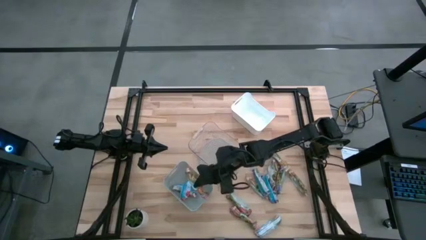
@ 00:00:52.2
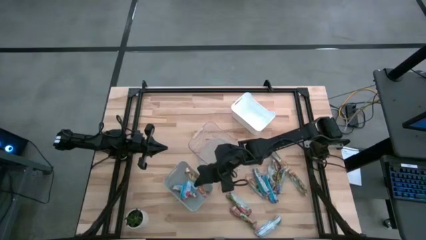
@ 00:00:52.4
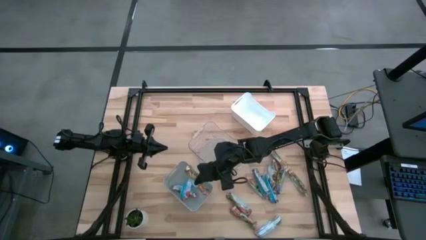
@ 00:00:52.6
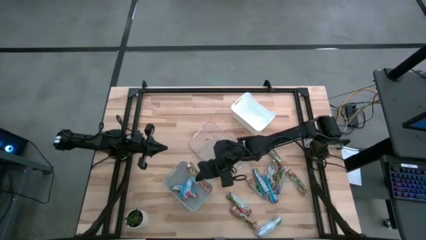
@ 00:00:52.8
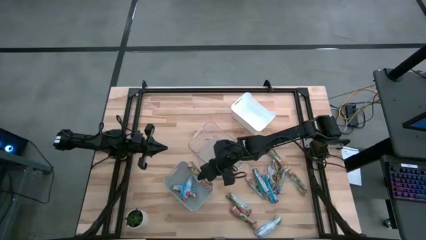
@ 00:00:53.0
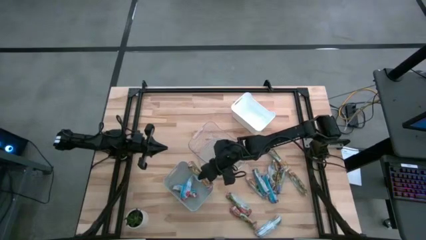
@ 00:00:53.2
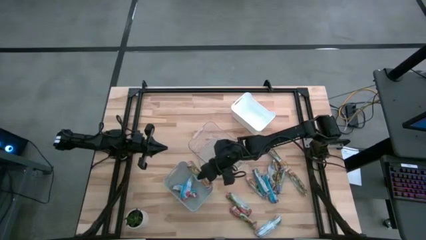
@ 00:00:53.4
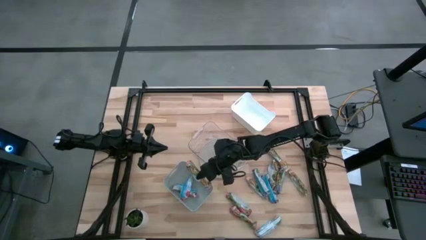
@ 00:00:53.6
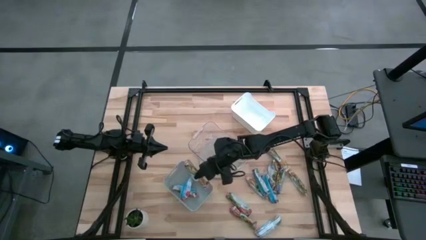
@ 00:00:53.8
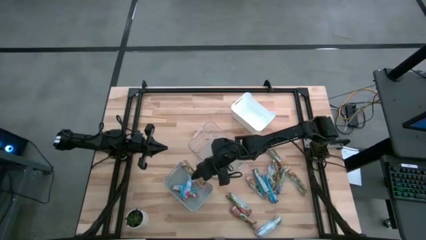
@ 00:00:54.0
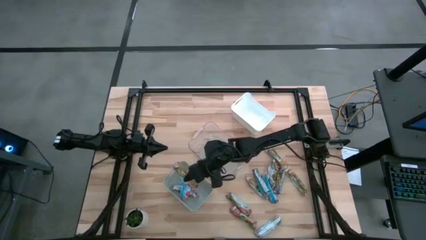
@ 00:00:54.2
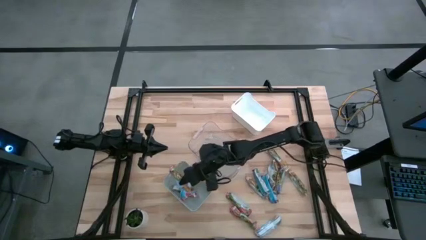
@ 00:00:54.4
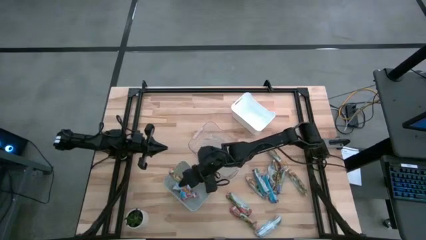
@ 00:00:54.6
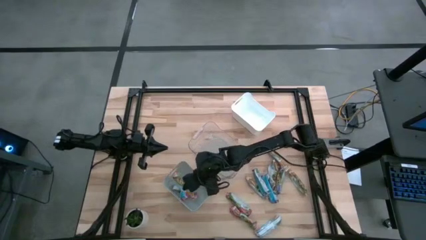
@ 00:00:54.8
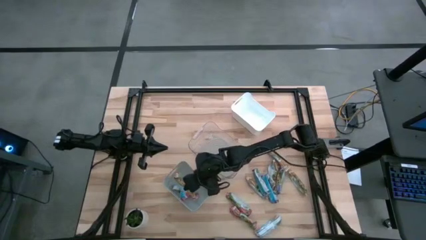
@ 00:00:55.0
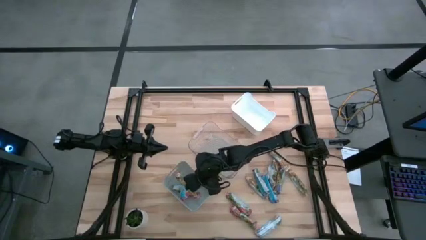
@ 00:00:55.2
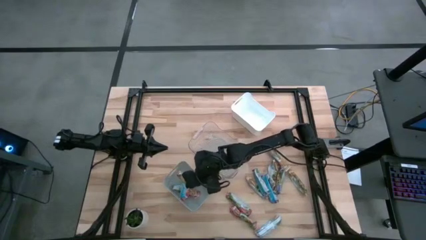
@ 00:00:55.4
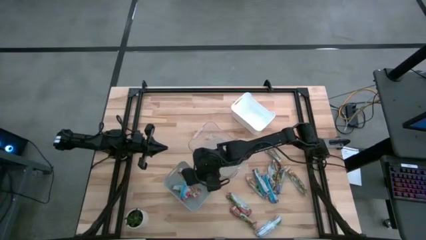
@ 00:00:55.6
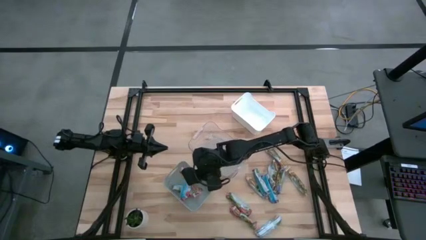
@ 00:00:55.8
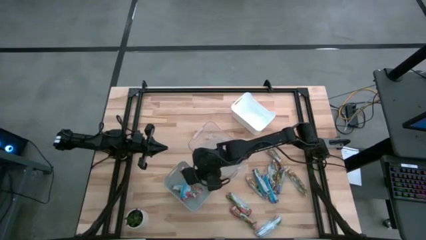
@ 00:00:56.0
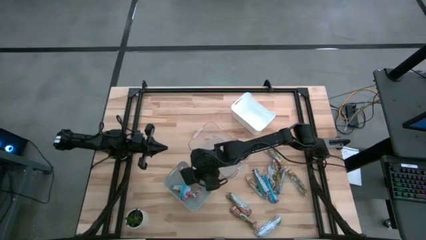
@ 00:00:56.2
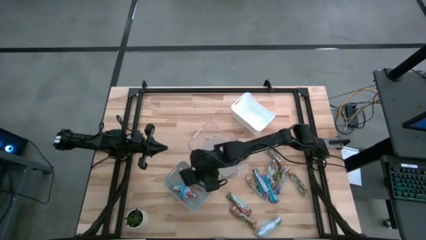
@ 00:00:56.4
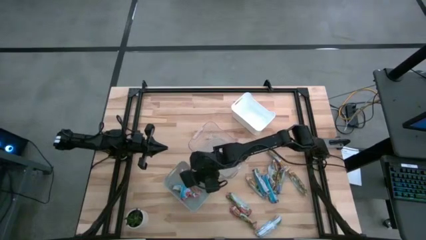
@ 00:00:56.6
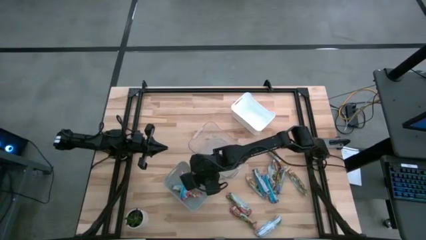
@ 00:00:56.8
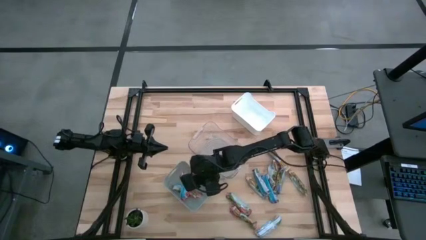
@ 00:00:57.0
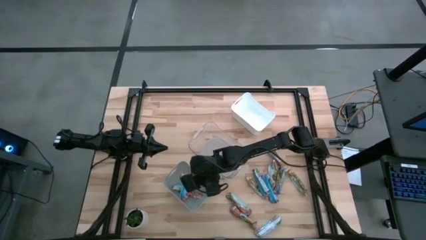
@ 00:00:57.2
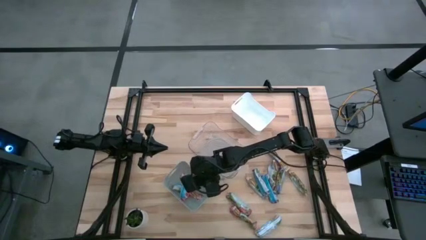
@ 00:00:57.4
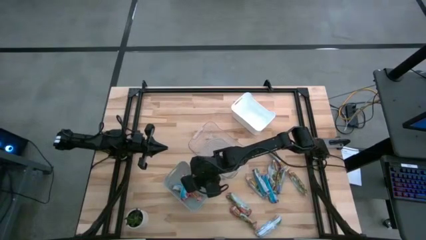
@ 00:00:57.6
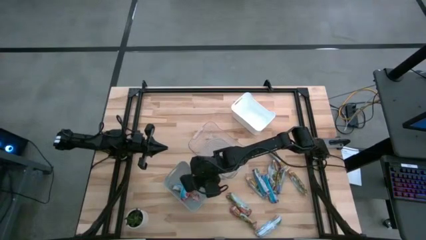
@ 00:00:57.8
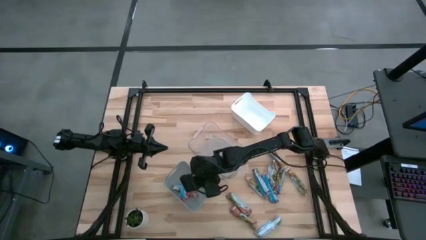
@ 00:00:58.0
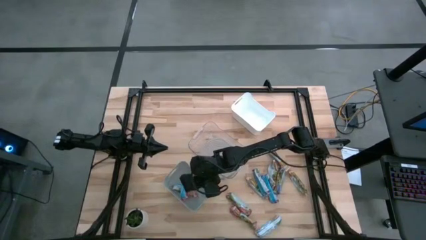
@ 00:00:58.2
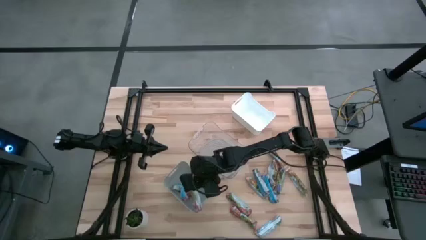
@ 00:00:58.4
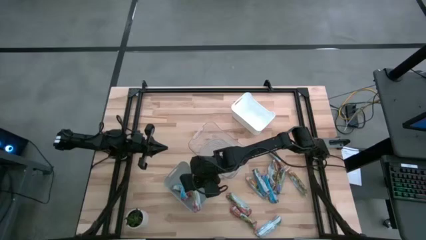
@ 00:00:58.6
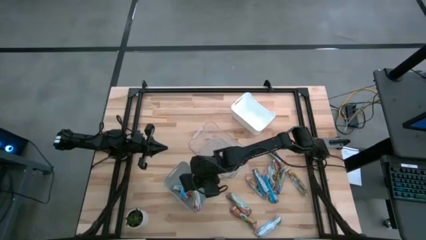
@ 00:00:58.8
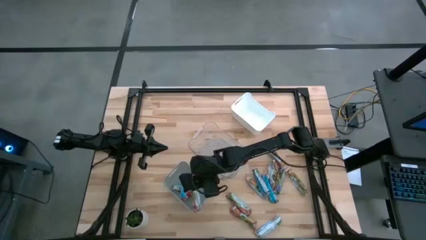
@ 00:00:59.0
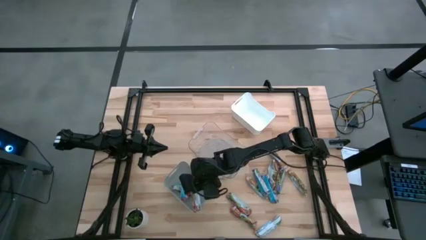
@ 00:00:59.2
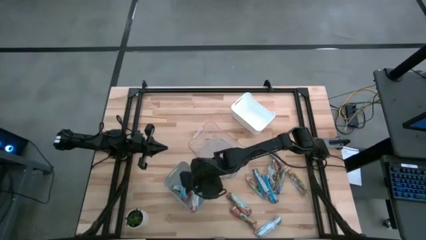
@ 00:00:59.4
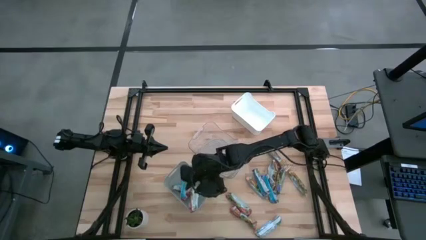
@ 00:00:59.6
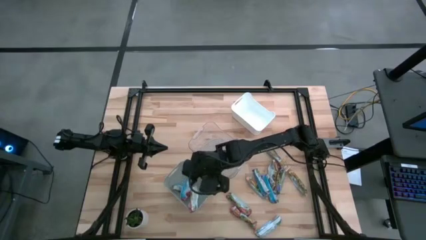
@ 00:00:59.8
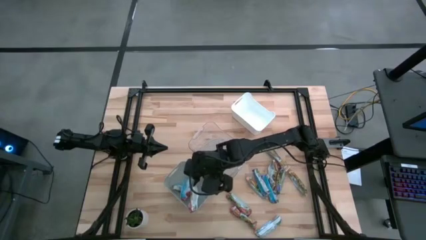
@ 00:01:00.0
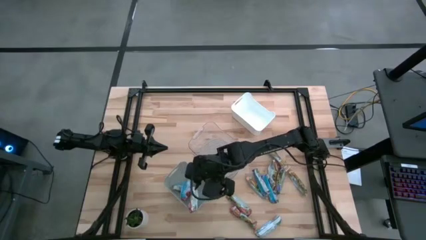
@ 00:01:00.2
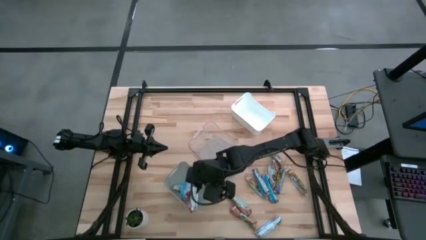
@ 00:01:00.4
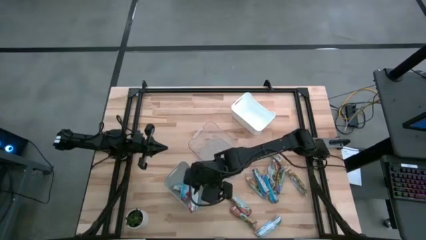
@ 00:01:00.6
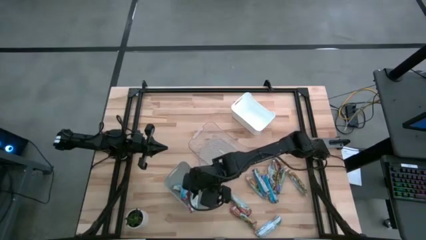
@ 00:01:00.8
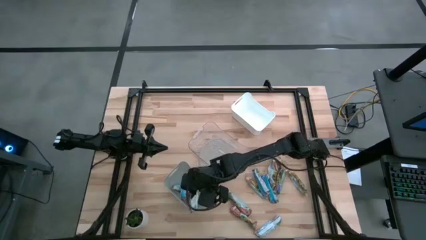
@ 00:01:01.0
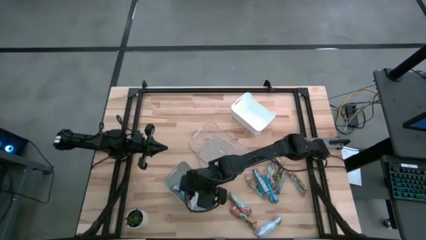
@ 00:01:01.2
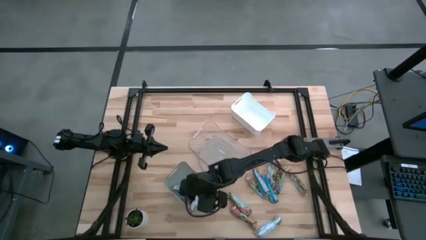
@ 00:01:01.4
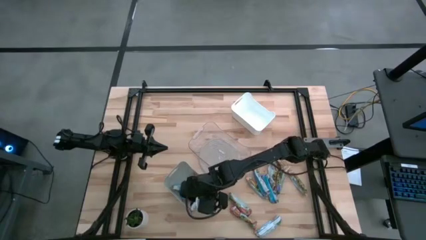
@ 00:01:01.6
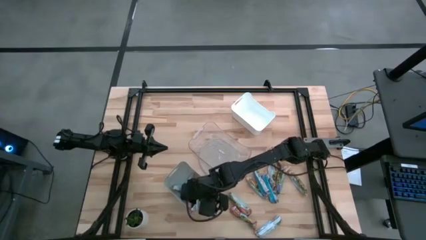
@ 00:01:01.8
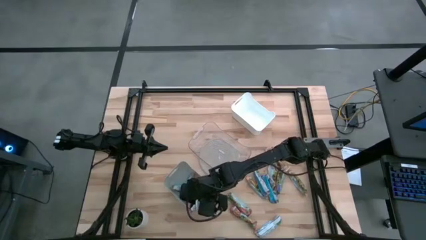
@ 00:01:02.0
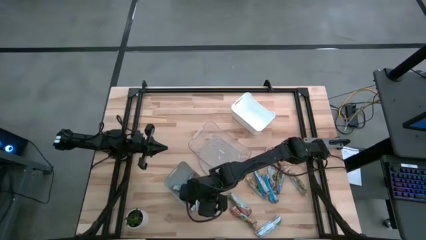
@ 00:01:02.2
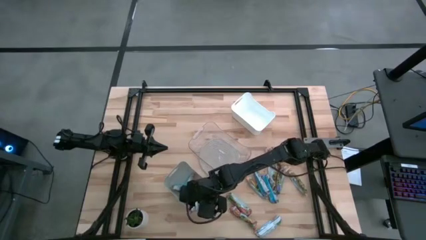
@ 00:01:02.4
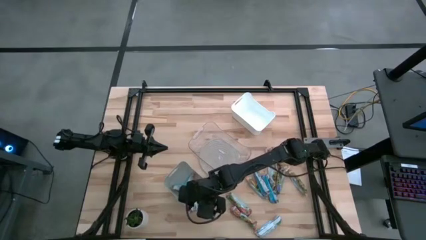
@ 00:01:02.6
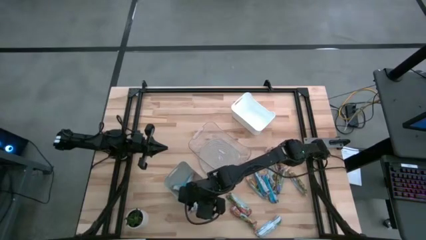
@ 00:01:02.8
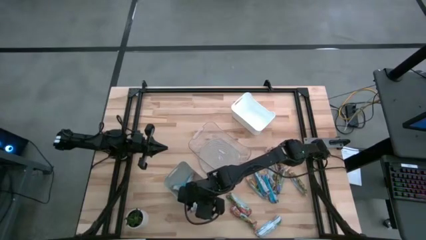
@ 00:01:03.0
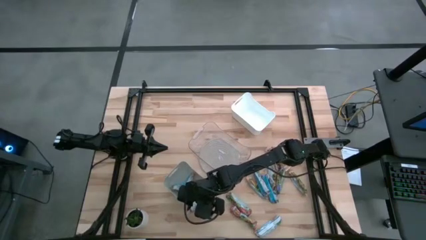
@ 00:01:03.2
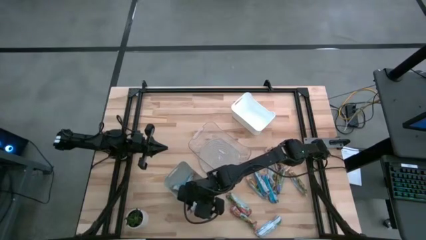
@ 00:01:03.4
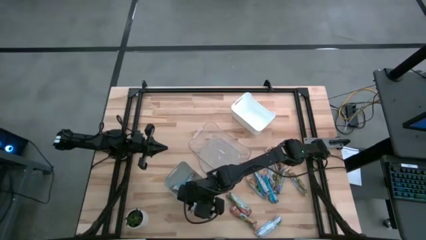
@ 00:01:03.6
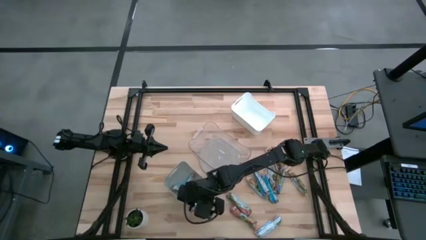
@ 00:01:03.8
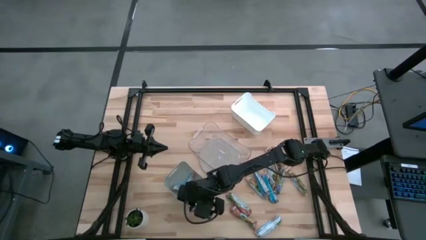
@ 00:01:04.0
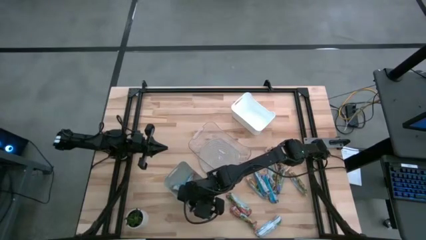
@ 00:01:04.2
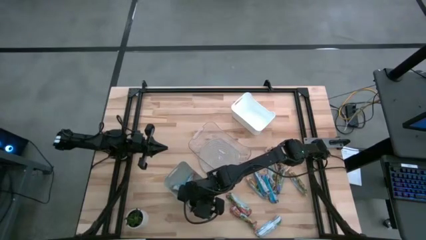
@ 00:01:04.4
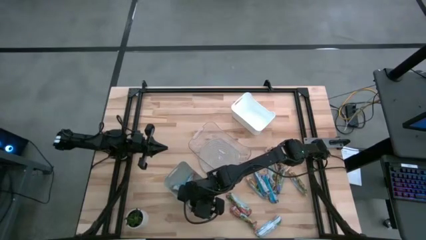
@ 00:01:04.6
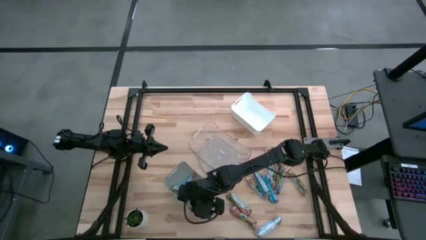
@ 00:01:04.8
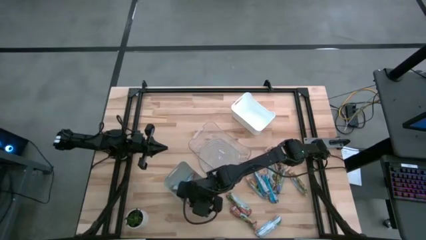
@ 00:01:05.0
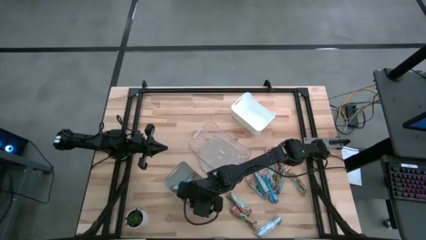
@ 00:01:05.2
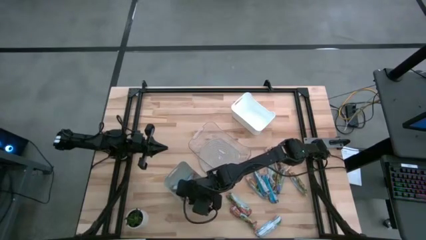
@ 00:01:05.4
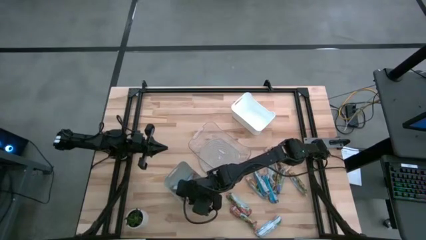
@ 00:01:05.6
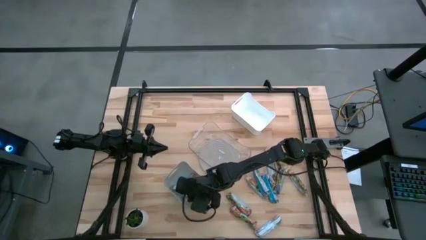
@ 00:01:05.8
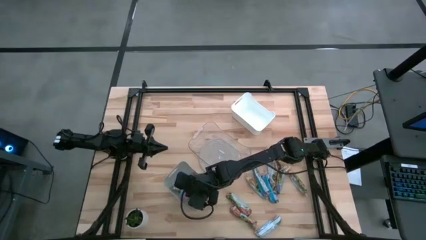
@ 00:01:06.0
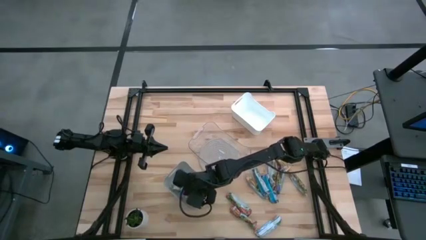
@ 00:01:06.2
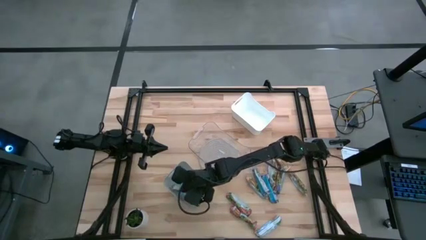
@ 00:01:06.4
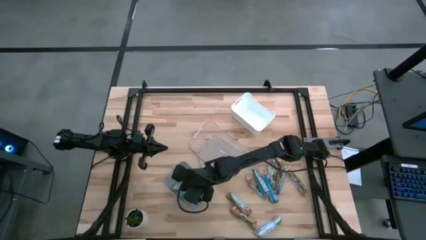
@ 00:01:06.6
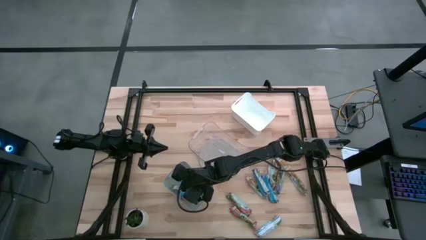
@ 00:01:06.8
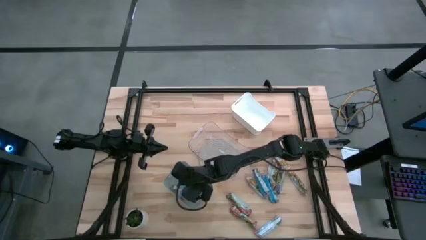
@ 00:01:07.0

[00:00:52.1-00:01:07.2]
Task: Pick and place Granola Bars by type
Put the red granola bar into the gray bin
